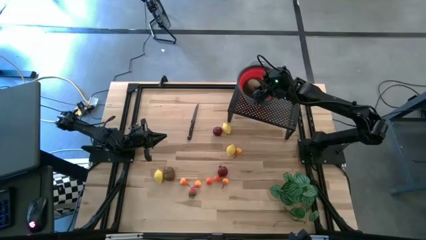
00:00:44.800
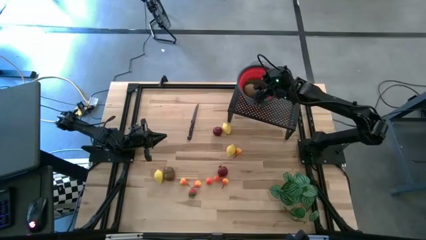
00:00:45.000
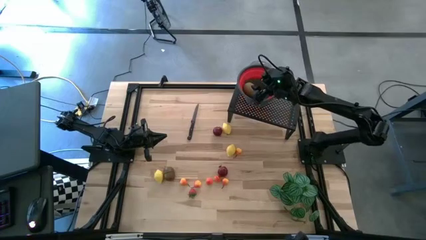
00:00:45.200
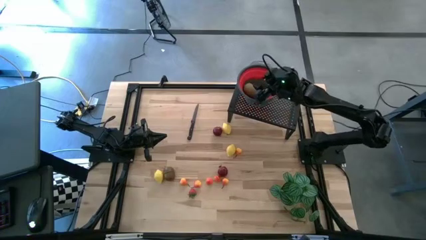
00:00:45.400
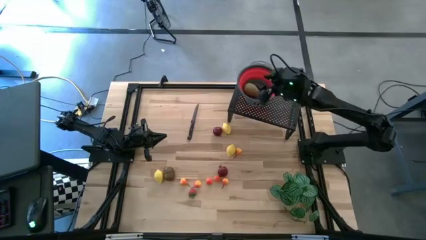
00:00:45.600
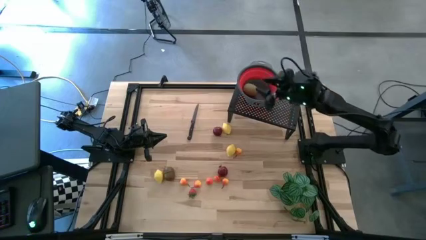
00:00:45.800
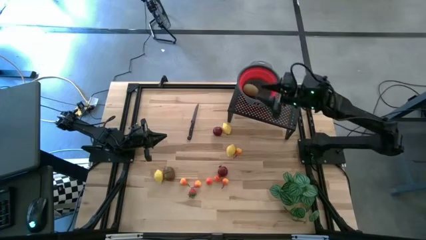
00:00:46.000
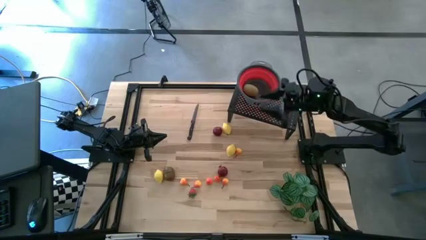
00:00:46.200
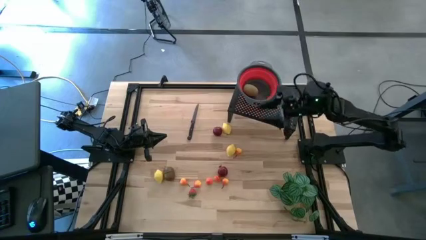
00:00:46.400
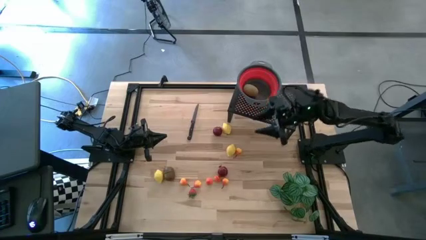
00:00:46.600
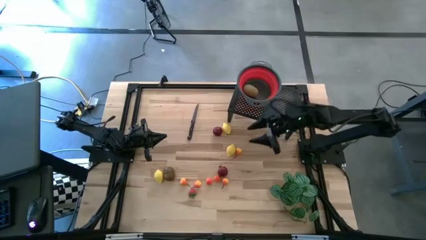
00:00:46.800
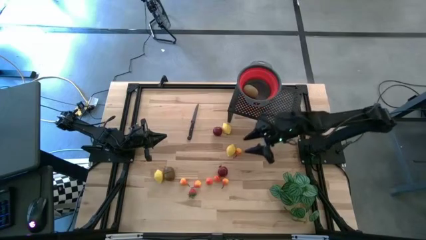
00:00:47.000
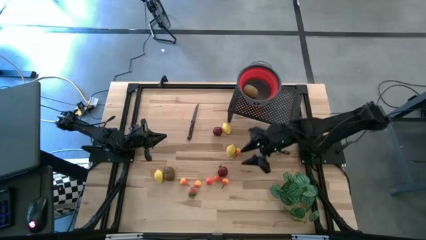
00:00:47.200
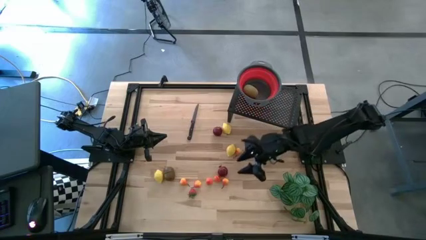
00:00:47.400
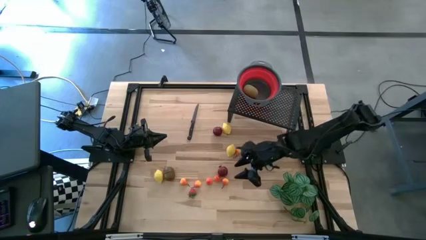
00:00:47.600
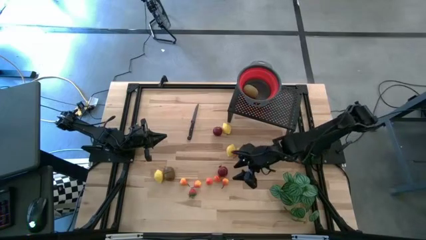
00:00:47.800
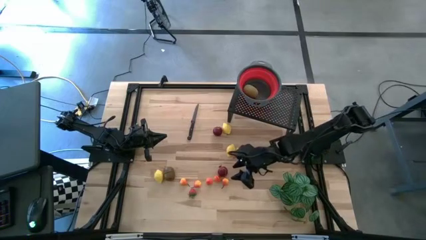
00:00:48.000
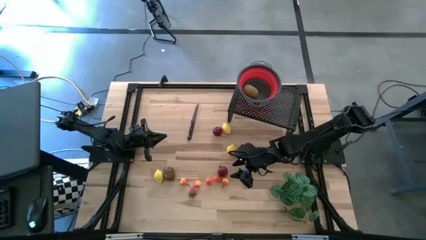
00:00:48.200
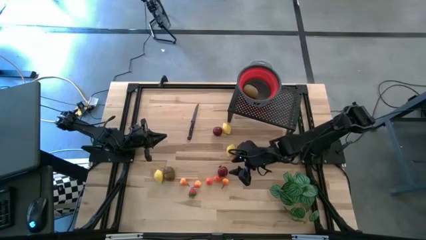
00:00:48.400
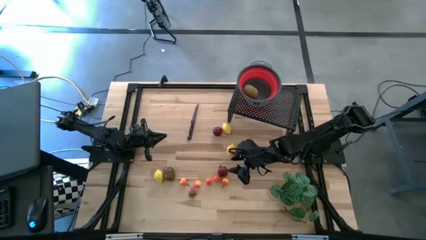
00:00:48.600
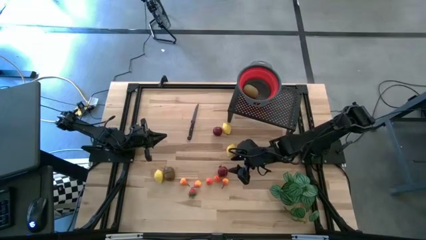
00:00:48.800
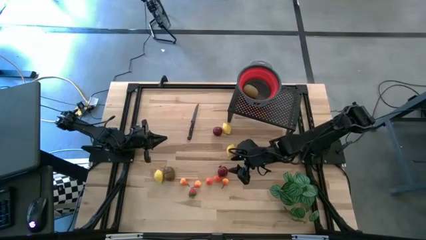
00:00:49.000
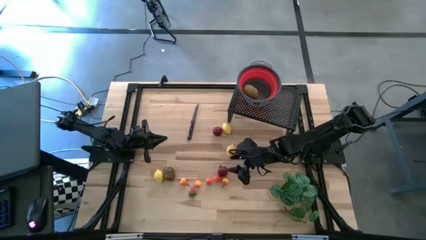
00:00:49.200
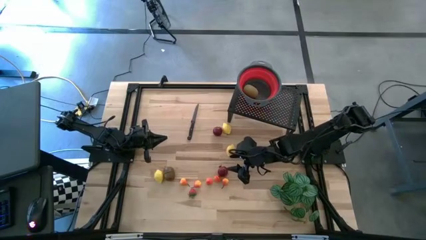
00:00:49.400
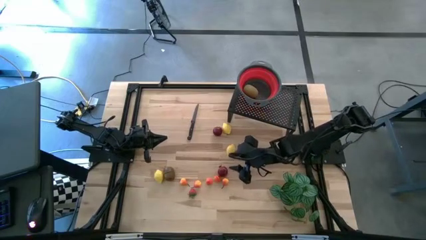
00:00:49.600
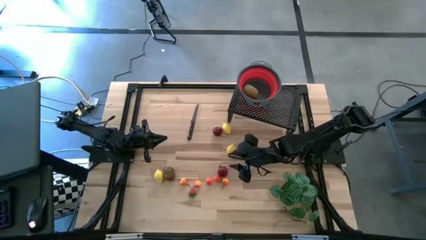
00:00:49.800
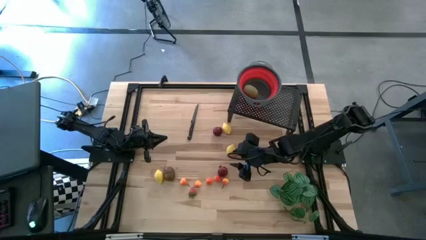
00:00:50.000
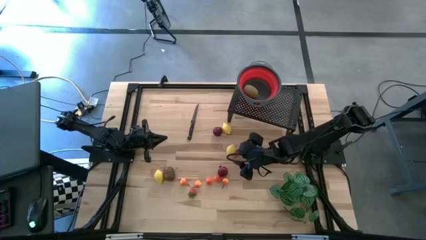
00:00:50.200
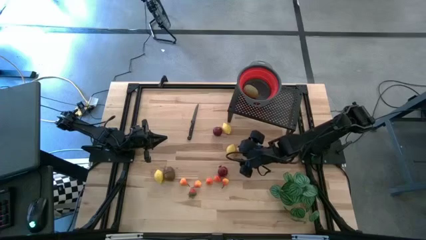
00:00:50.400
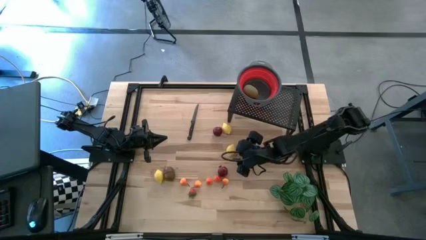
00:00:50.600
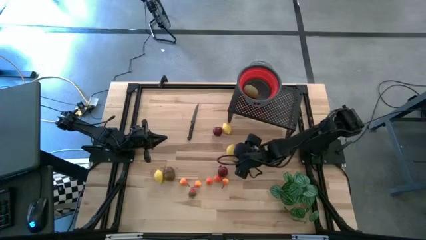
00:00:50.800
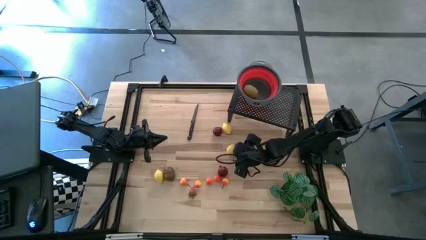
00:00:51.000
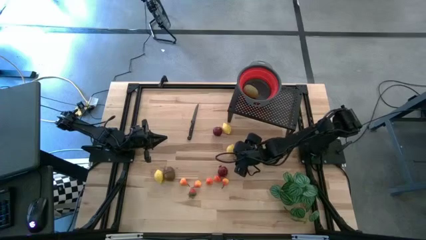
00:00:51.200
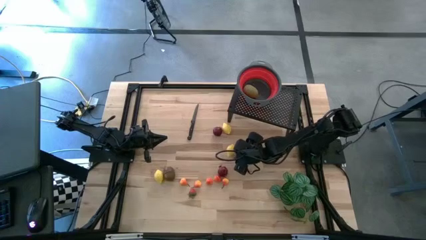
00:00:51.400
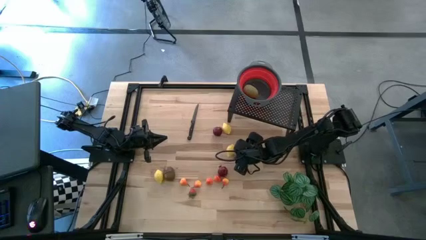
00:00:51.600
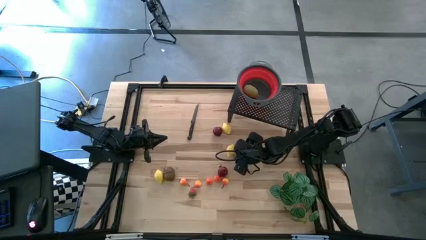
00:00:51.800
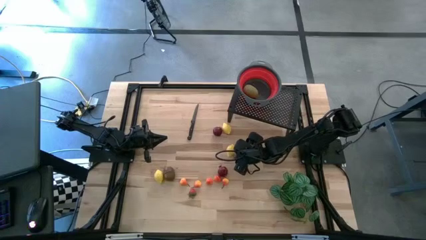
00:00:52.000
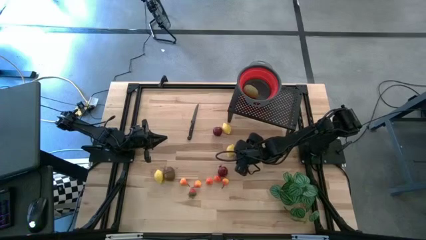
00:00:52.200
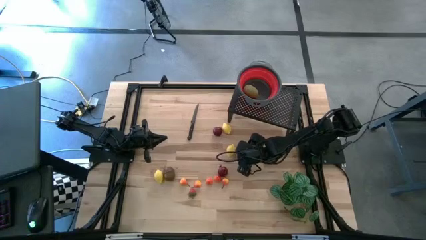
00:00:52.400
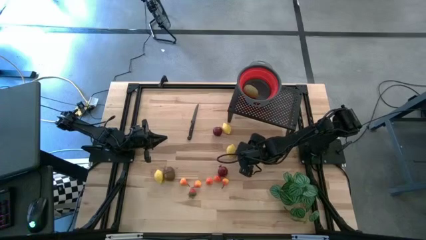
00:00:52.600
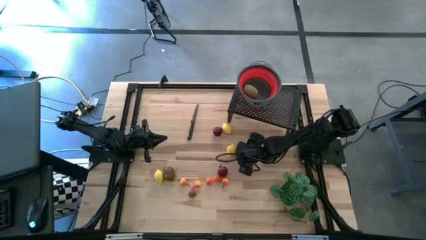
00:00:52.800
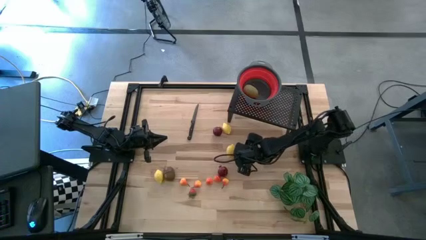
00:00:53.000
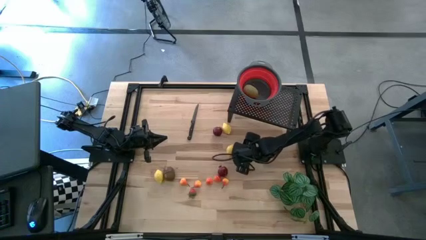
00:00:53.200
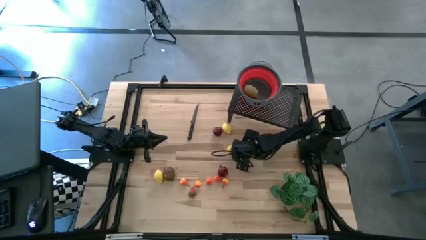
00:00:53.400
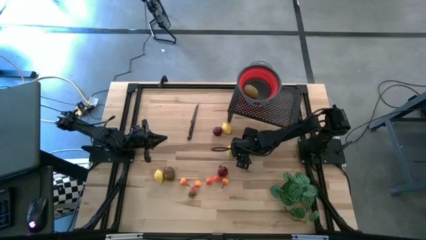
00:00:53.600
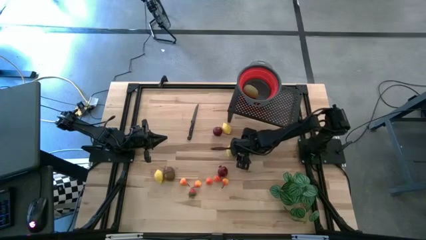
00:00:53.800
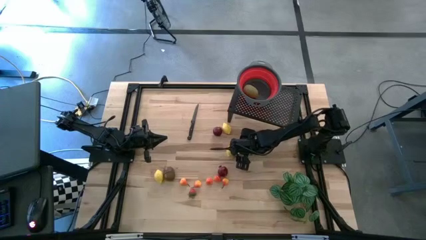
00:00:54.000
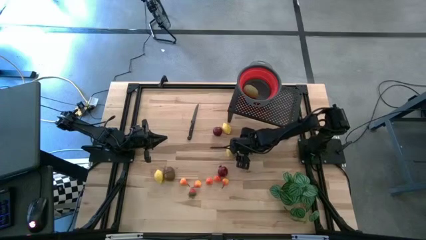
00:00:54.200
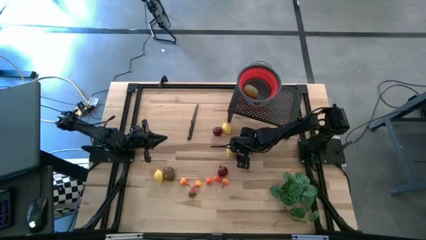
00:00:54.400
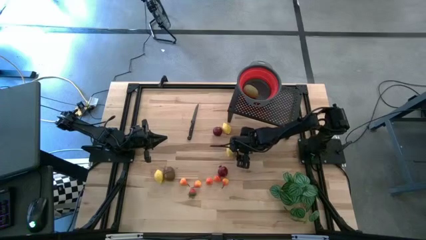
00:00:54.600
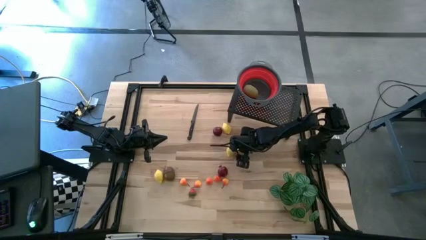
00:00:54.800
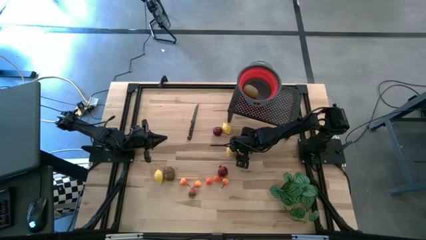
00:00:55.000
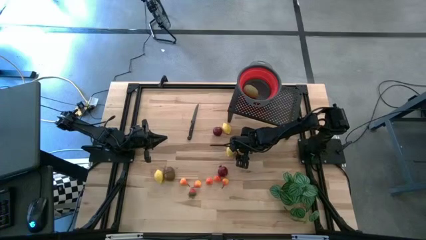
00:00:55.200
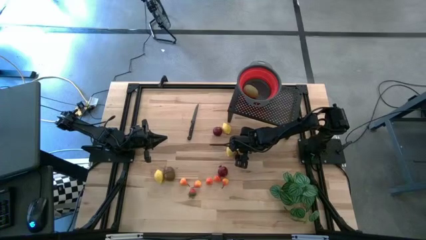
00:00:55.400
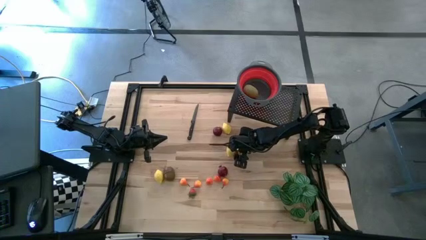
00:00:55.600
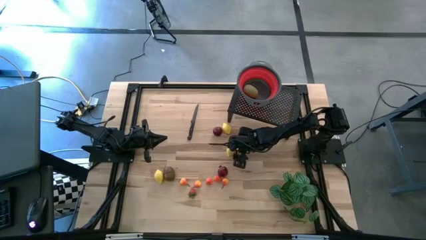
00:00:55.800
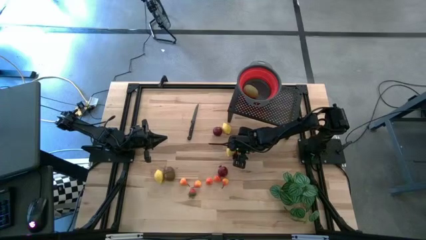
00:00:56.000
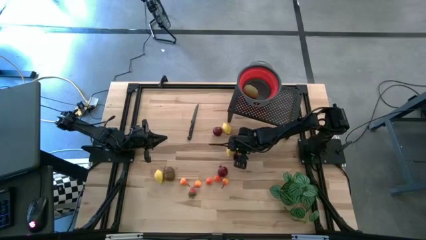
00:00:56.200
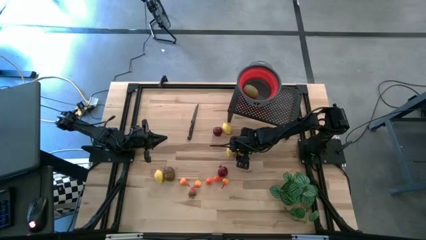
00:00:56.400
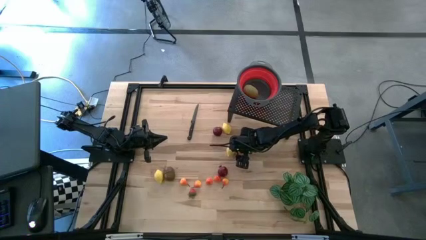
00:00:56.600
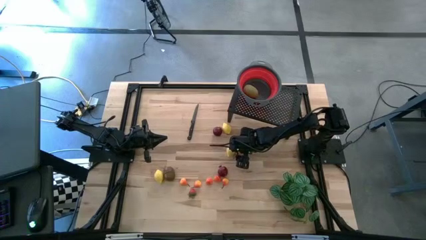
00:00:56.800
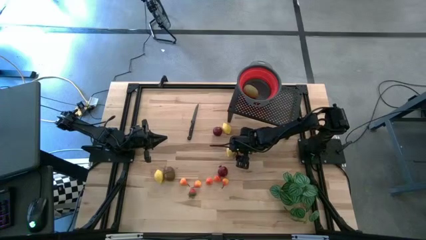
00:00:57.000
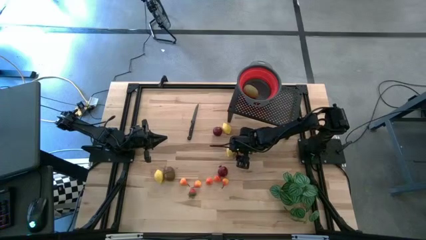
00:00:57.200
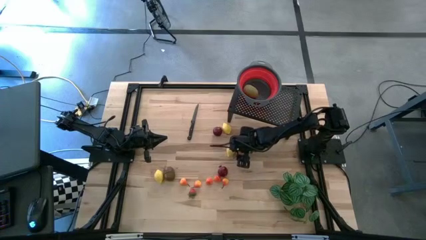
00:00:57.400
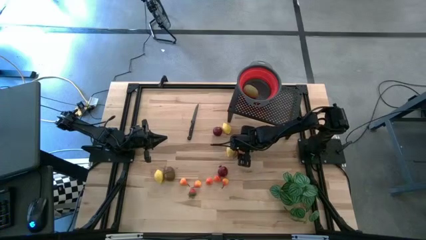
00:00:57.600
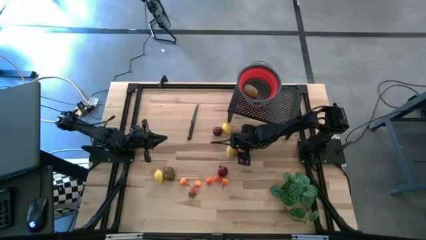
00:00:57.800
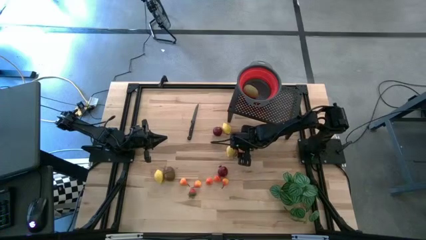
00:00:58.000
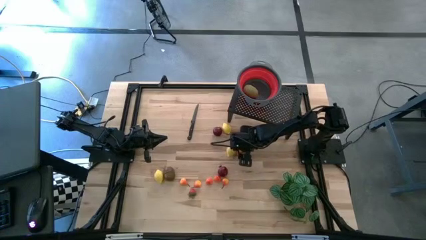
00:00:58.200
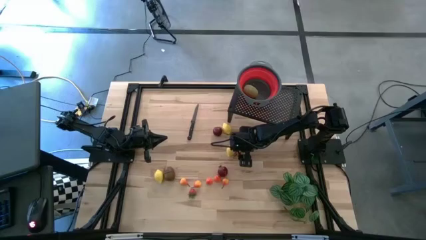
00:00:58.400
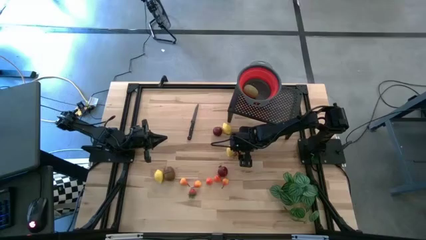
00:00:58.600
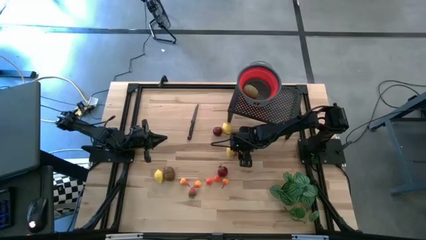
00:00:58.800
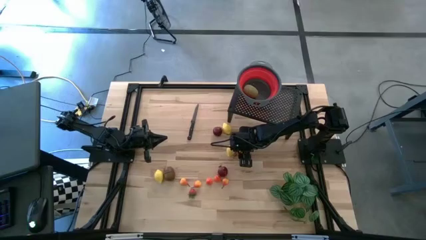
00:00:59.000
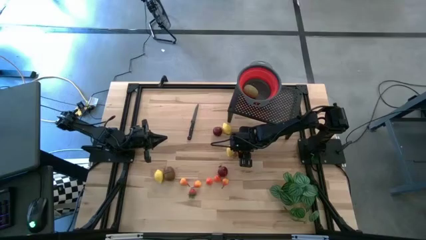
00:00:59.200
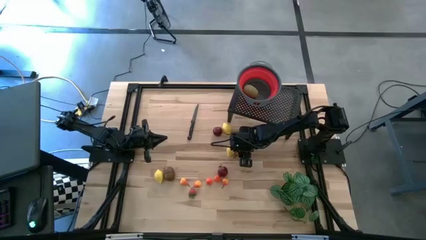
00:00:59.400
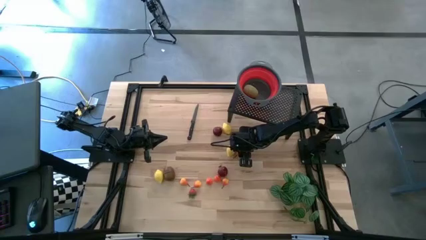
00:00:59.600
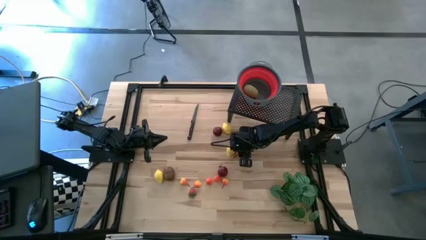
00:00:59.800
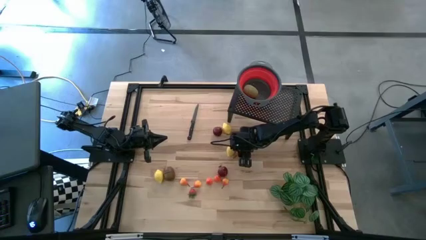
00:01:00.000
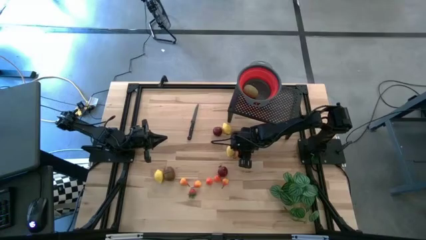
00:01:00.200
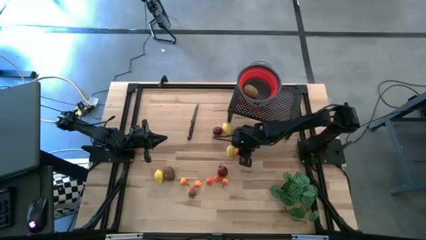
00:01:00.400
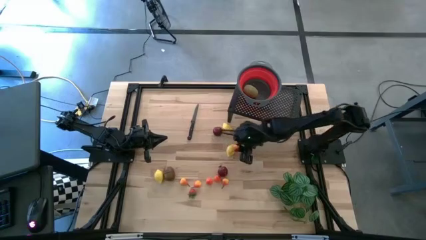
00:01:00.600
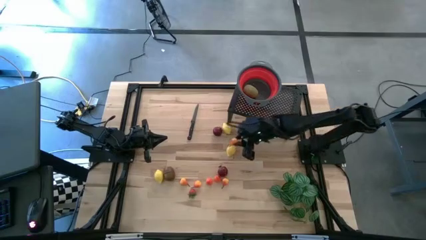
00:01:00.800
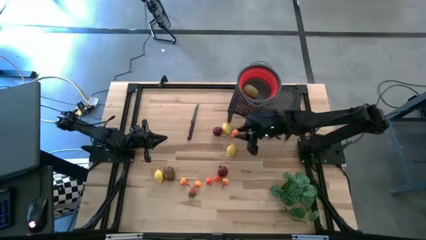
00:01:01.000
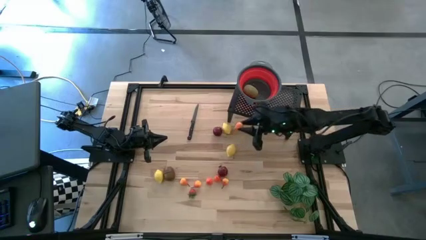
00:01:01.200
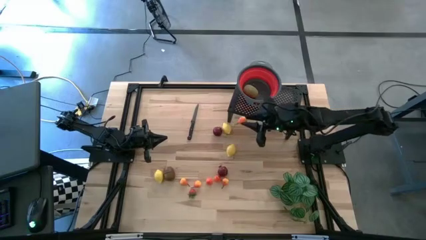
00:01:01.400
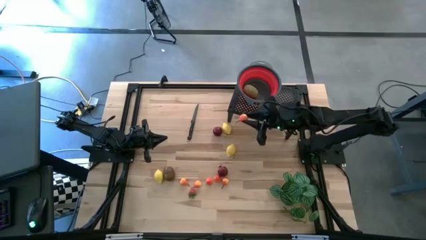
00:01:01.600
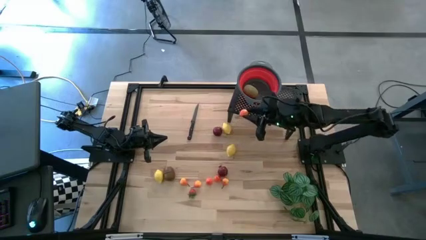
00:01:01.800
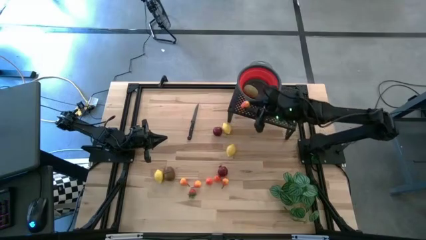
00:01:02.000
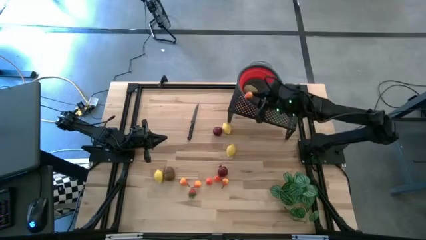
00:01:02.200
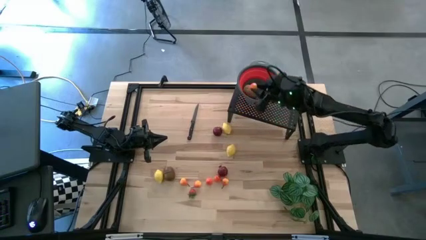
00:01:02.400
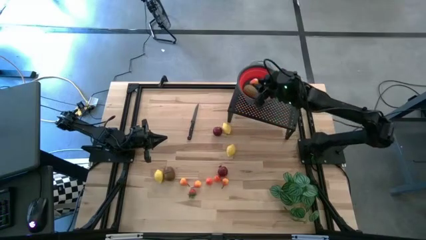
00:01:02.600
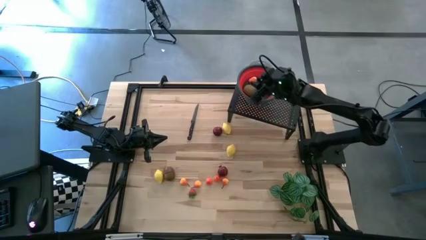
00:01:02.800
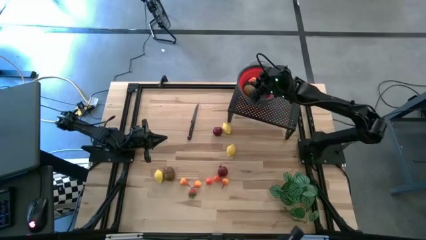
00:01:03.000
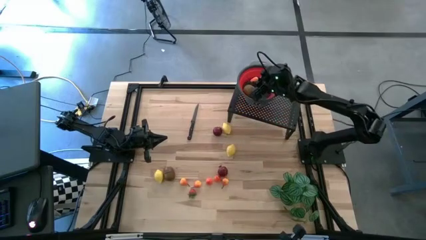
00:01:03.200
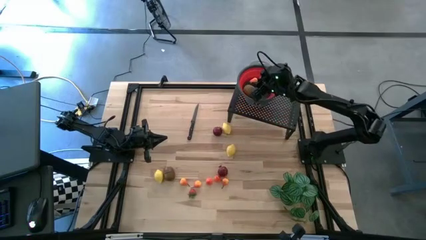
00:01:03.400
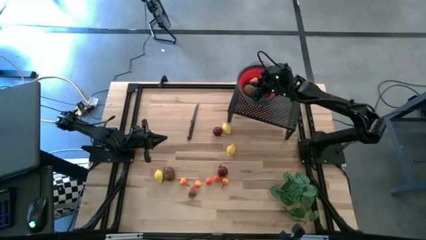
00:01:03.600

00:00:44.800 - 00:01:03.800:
Task: Pick & Place Fruit
Put the orange pear into the red strainer bowl on the shelf
